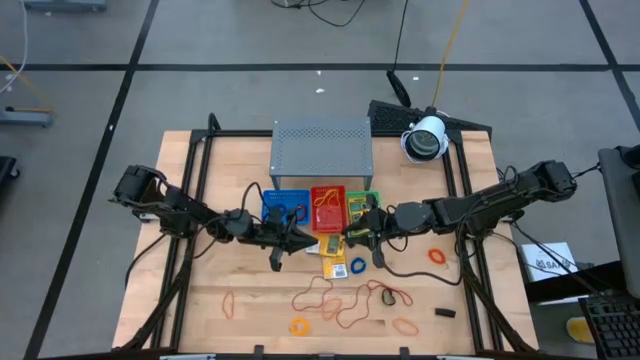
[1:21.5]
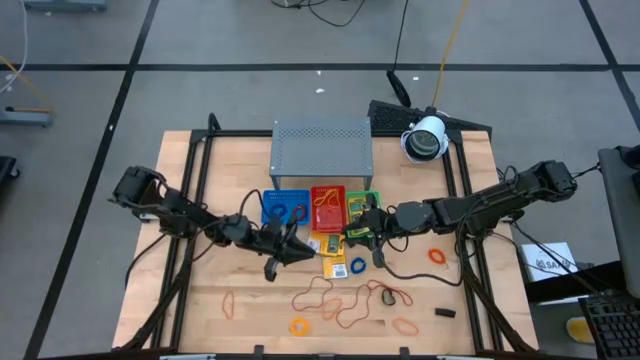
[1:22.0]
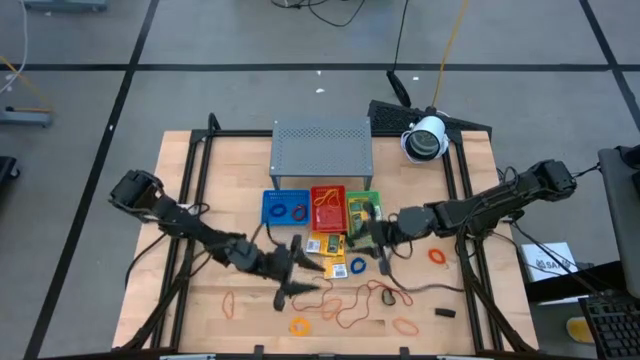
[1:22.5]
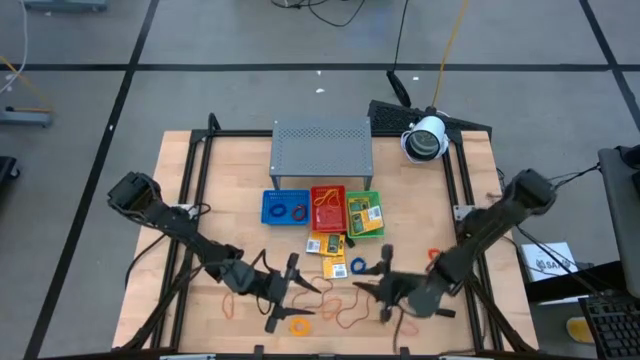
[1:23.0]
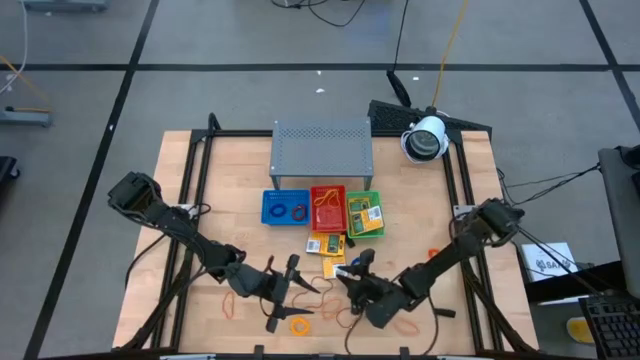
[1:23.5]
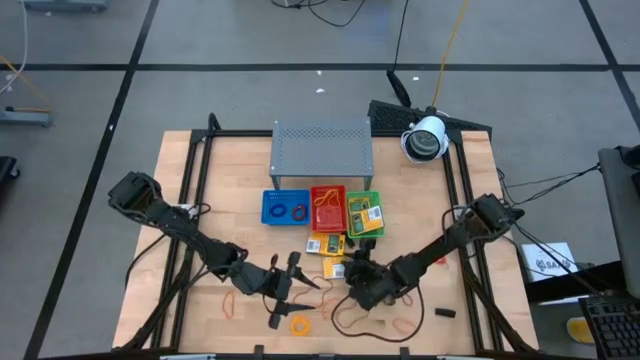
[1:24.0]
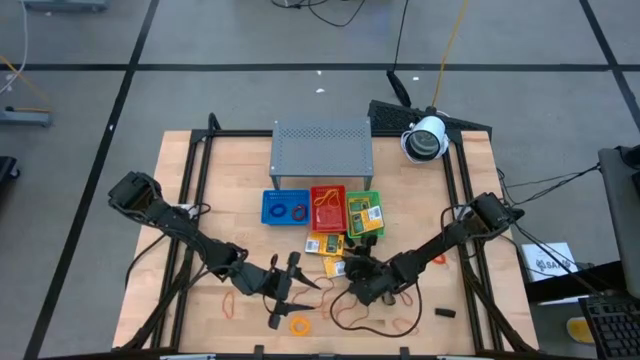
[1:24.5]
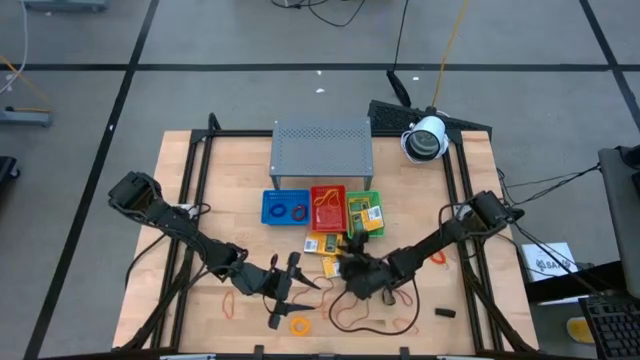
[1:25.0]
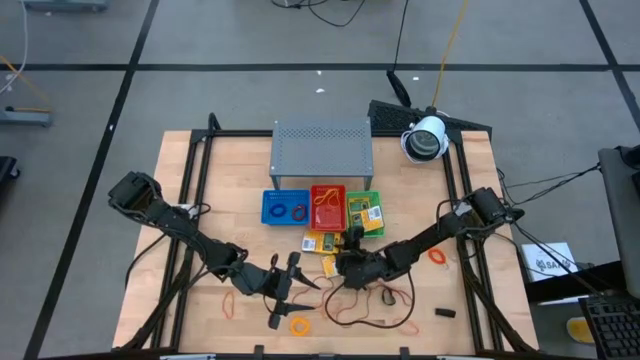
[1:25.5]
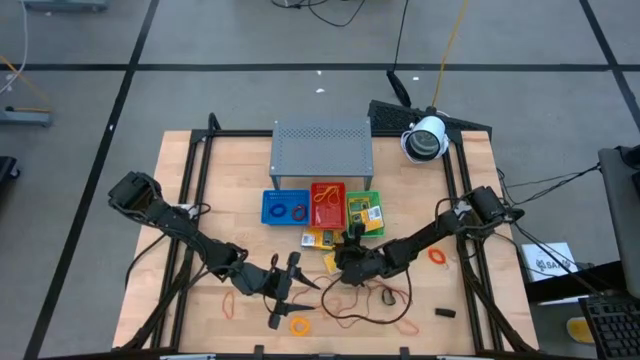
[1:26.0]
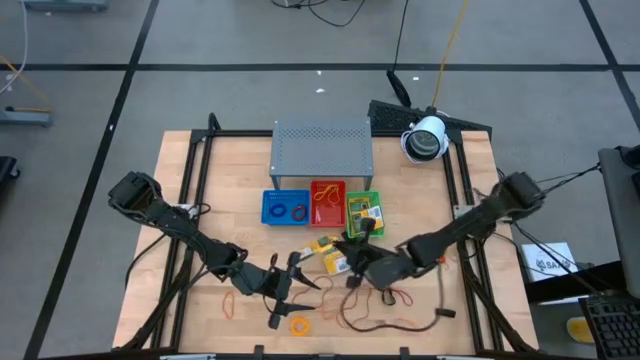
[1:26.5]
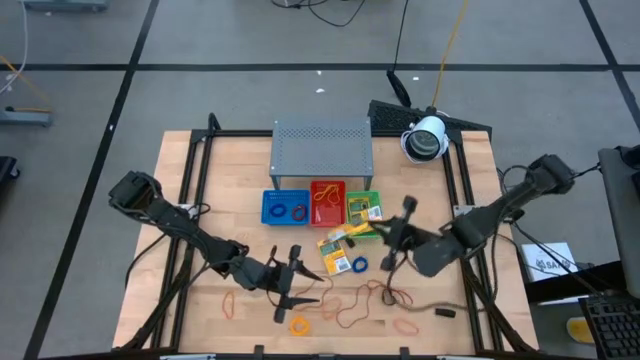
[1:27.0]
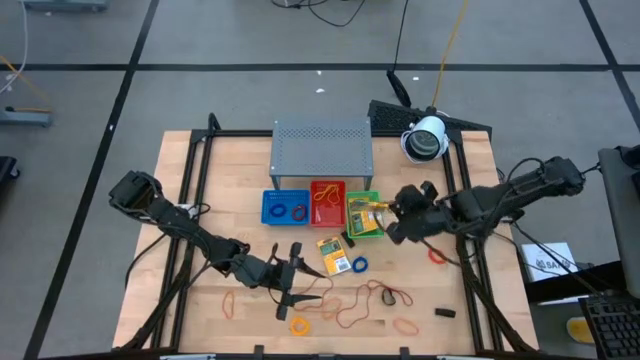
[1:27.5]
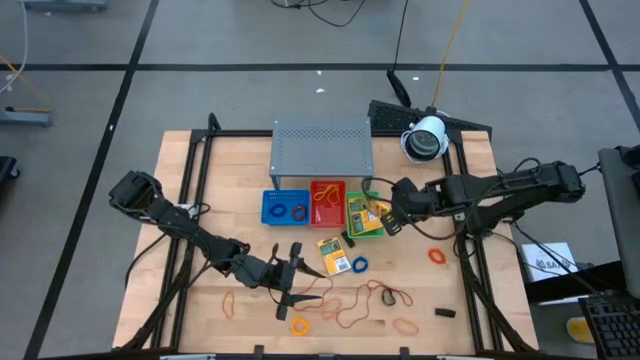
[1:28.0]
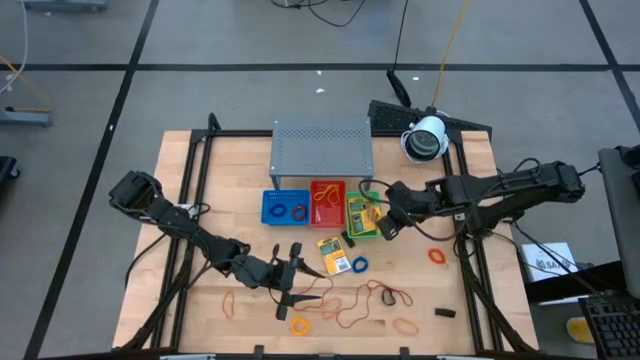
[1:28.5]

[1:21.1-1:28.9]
Task: Pick & Place Office Desk Supplies
Put the crayon pack into the green bin

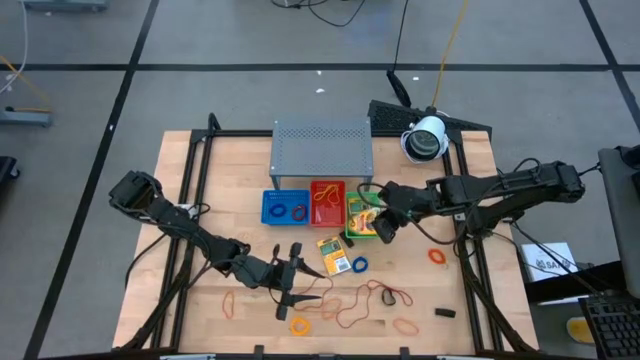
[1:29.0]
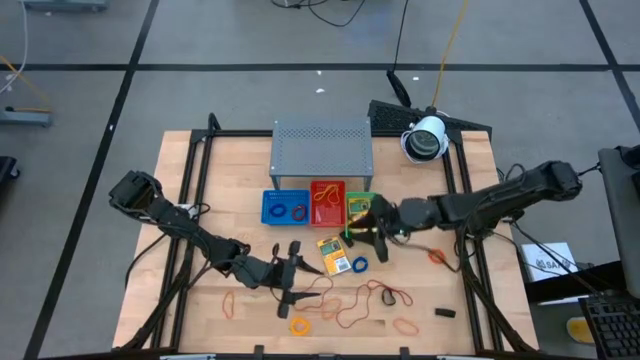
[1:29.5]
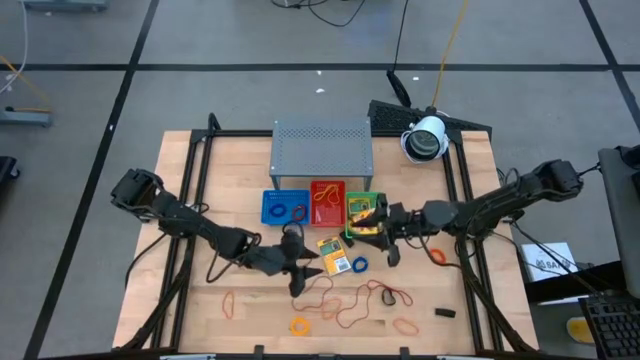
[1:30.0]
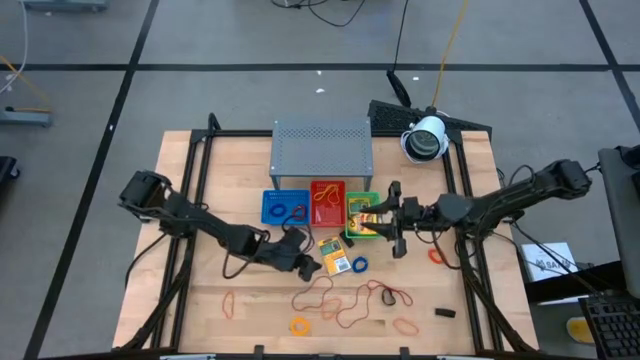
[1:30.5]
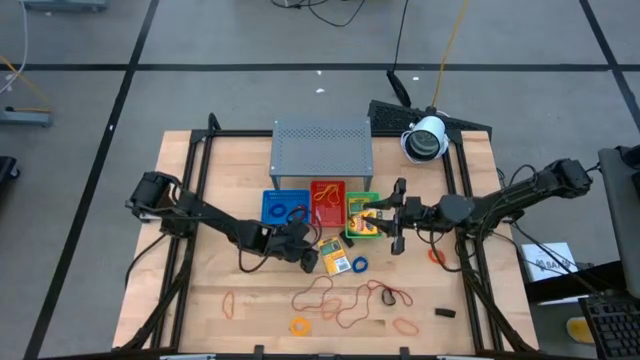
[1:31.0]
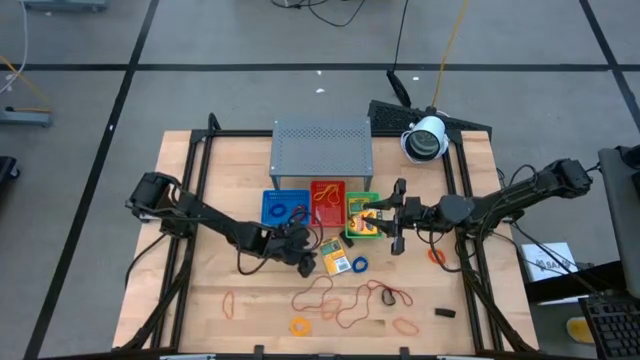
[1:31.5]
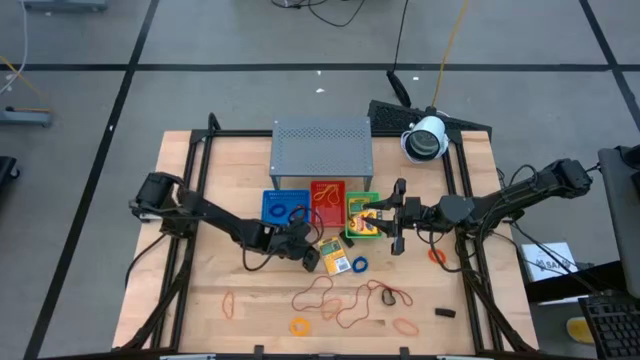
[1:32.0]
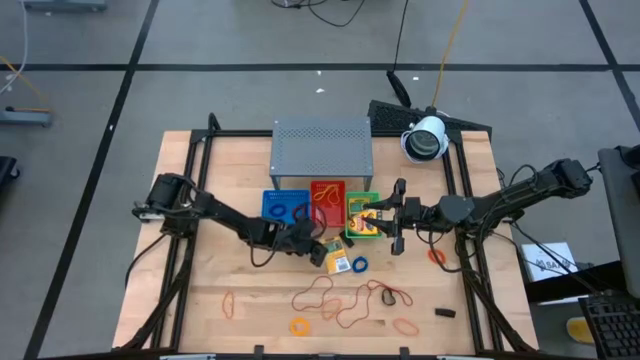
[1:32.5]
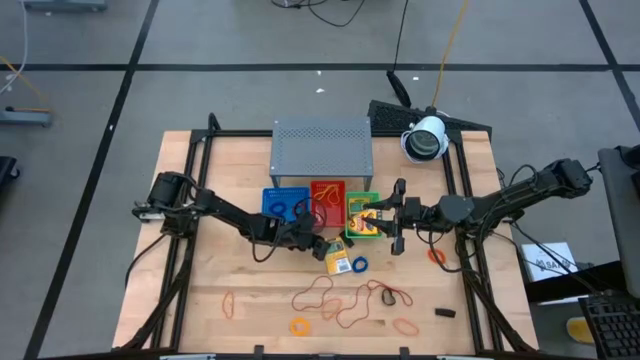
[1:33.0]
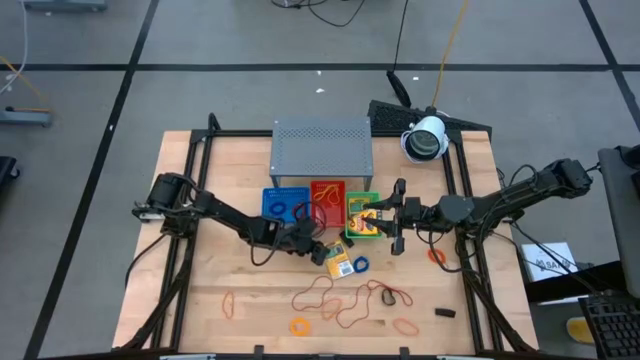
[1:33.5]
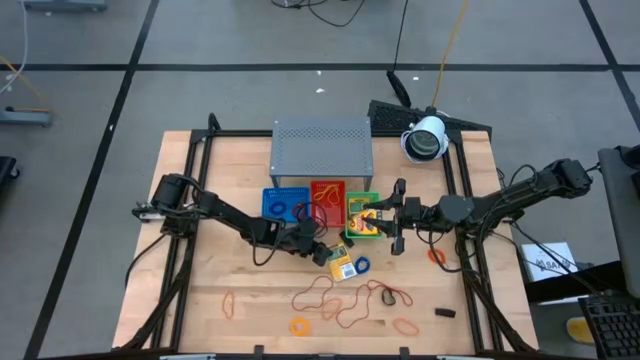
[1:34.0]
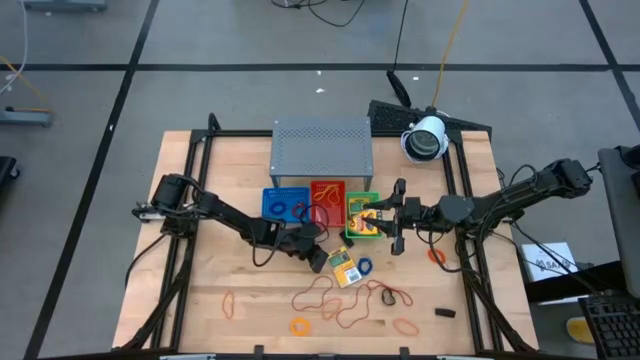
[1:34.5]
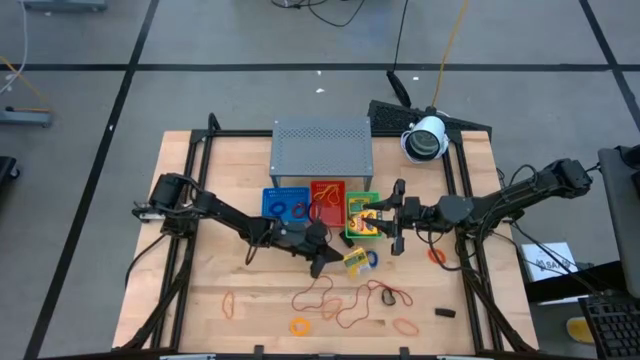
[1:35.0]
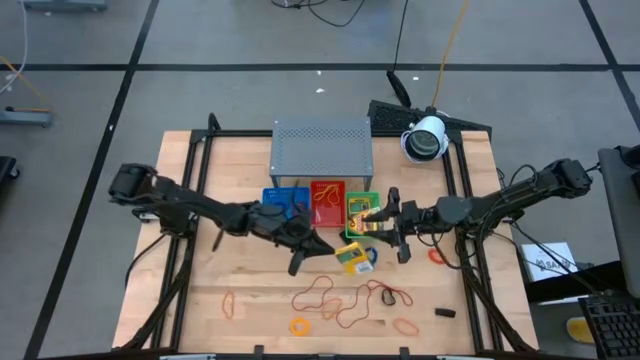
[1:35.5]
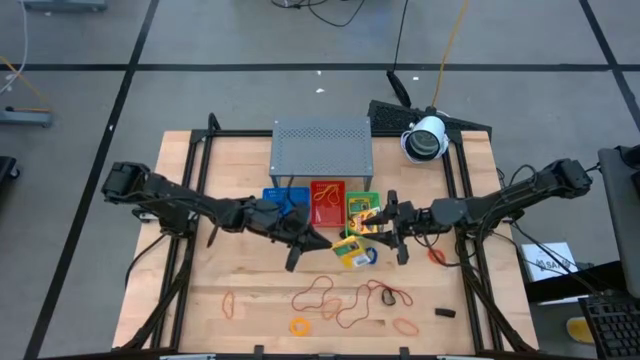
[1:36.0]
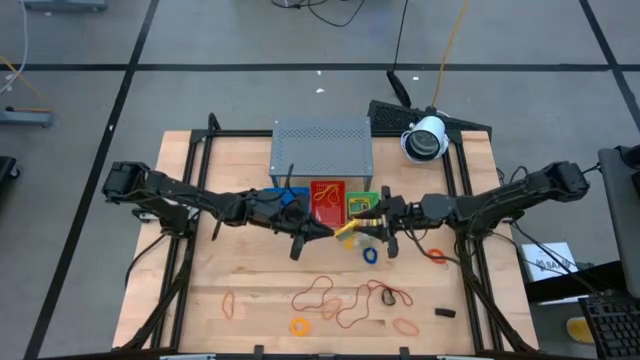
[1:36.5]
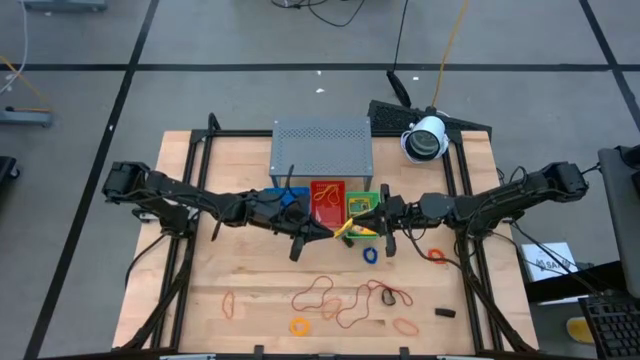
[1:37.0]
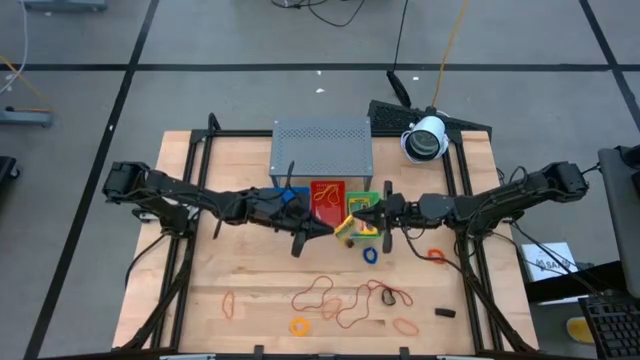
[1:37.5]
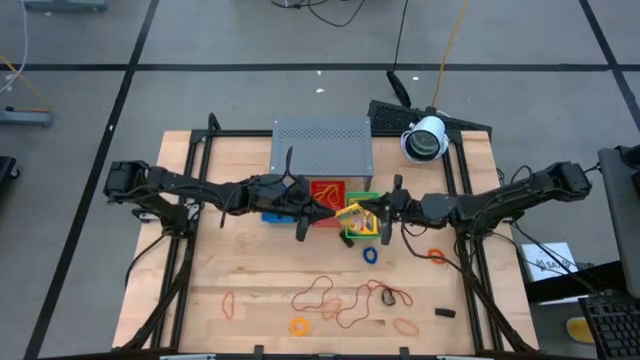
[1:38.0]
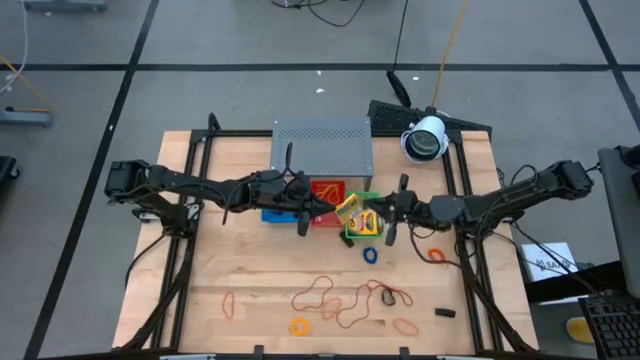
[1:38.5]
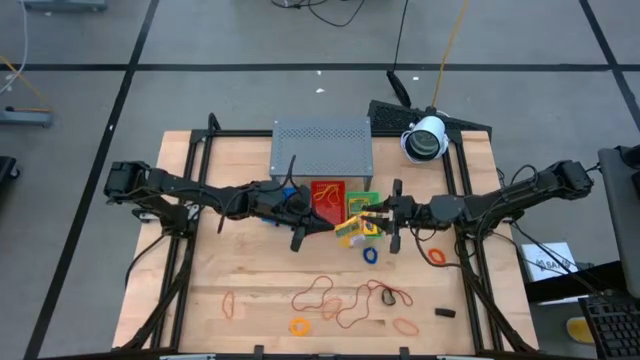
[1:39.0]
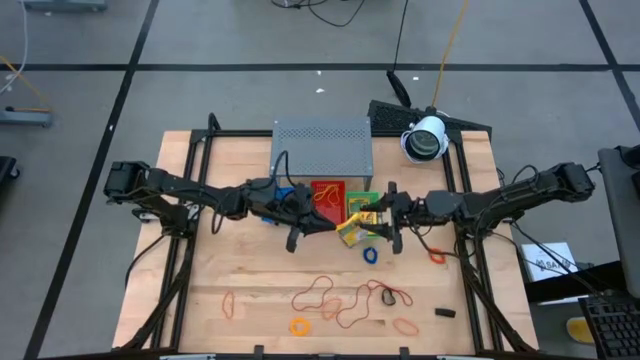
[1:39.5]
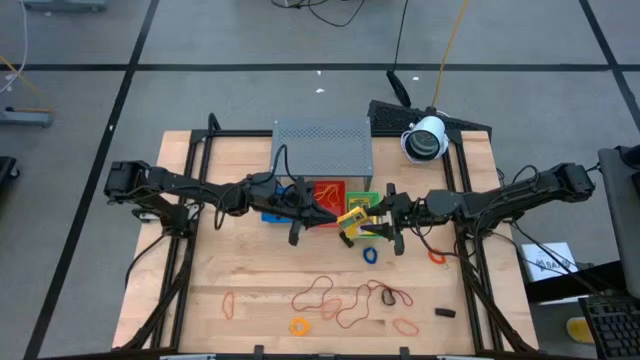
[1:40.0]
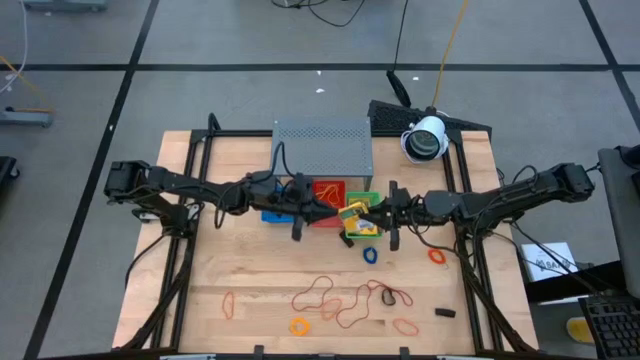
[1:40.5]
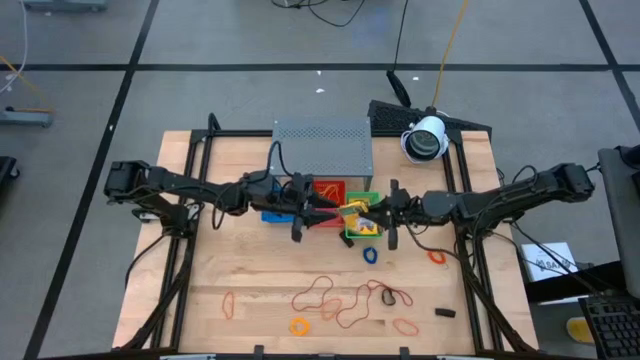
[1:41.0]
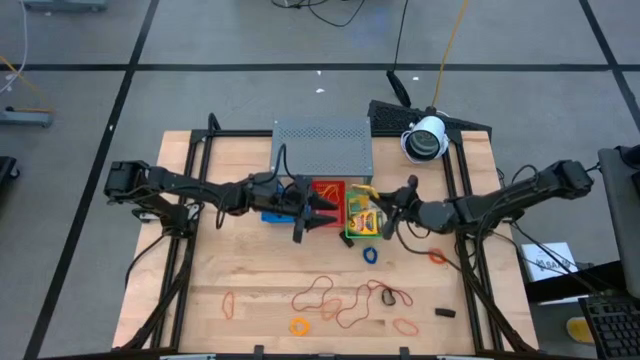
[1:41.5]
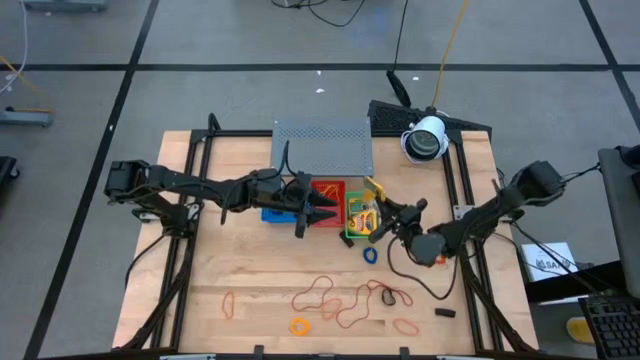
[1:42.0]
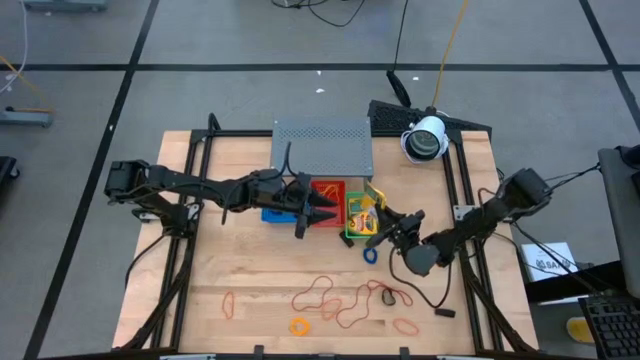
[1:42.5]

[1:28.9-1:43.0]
Put the crayon pack into the green bin

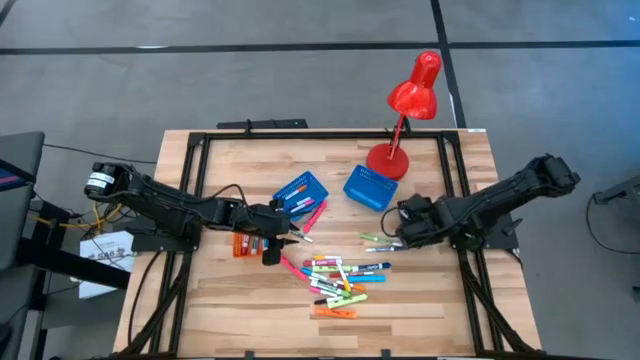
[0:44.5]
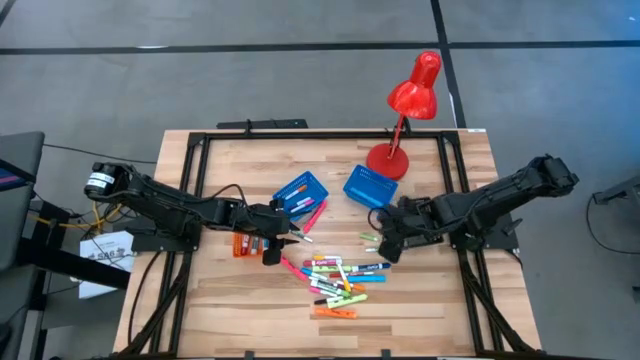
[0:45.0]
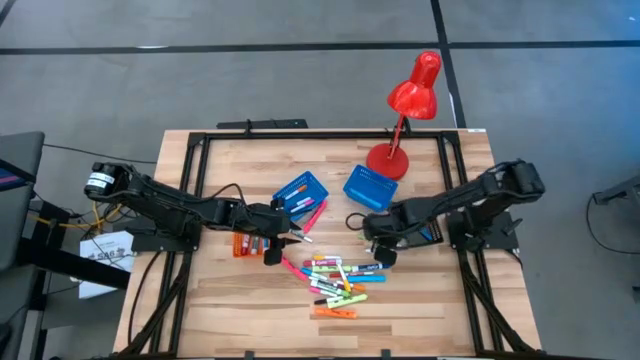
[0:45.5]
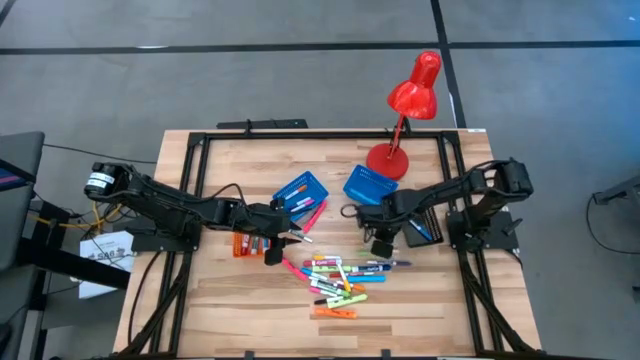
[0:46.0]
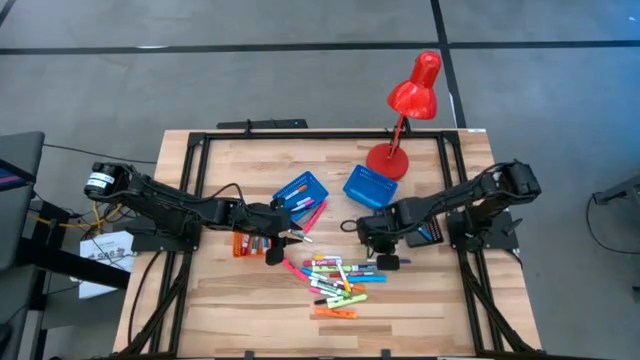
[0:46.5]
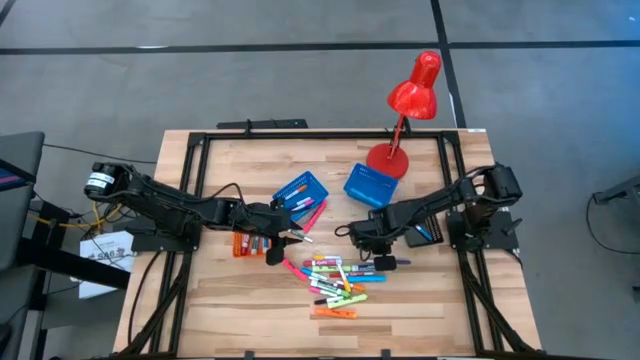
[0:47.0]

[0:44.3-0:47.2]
Task: Pick & Place Markers
Put the small light green marker pen into the black bin
